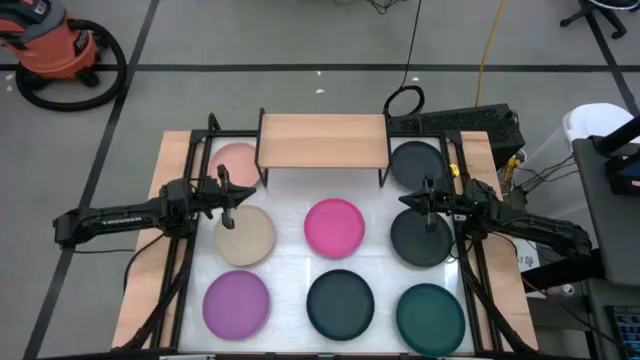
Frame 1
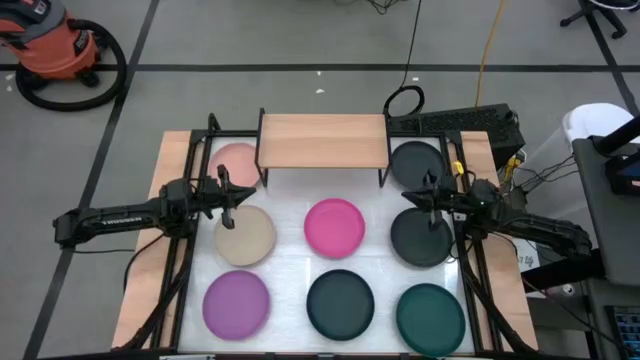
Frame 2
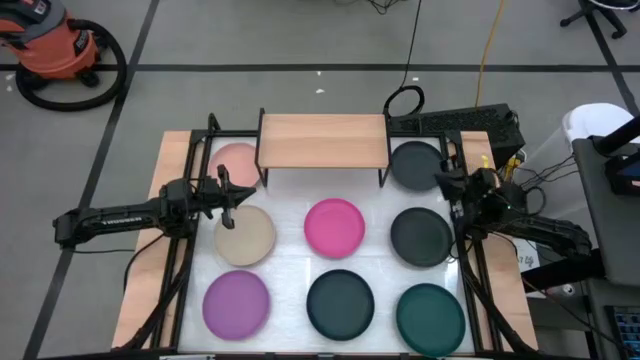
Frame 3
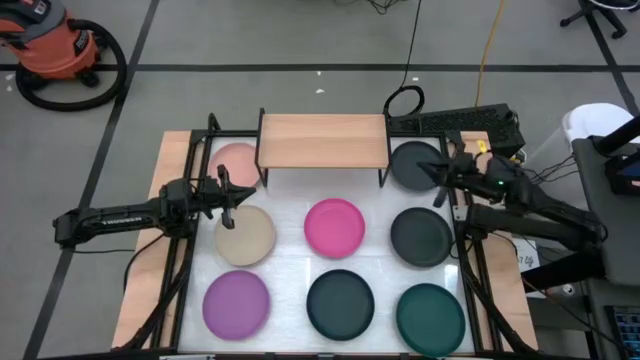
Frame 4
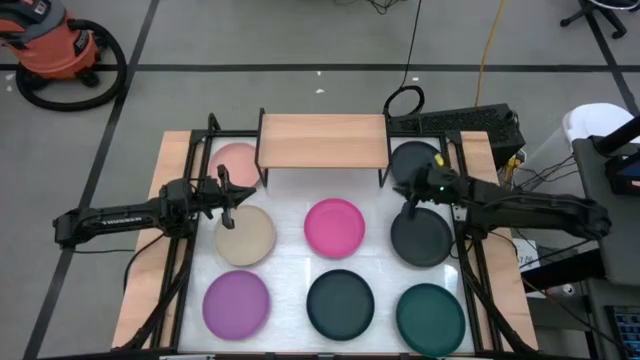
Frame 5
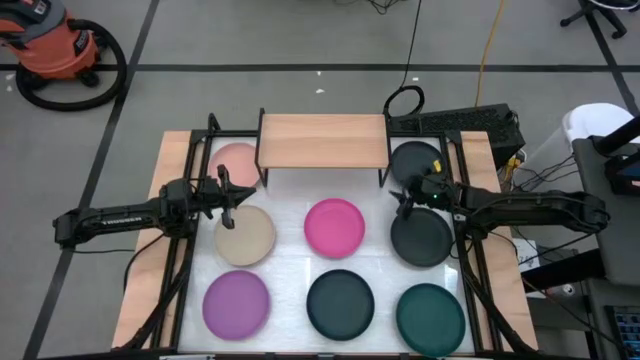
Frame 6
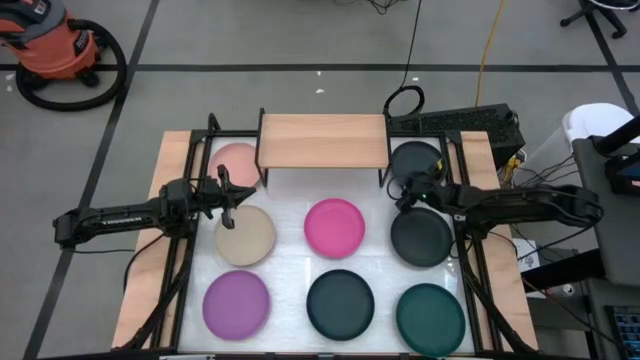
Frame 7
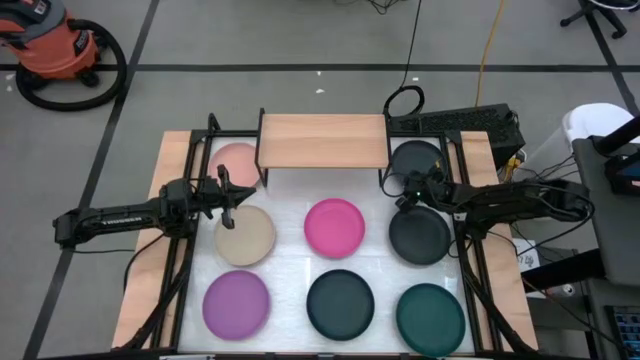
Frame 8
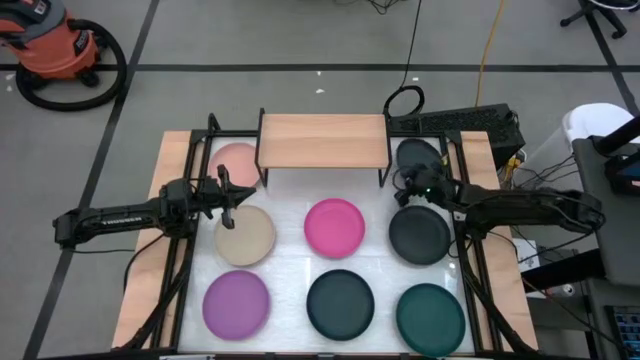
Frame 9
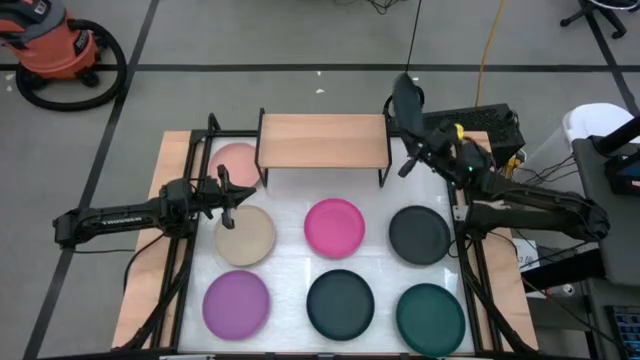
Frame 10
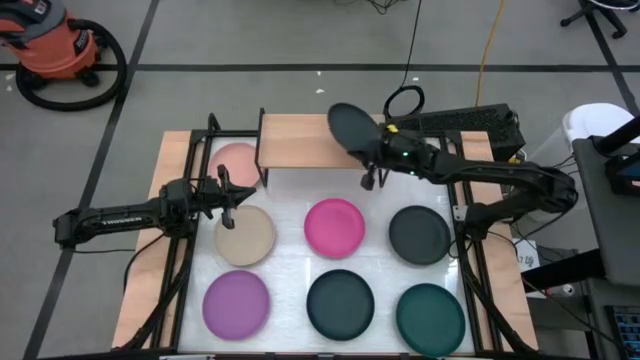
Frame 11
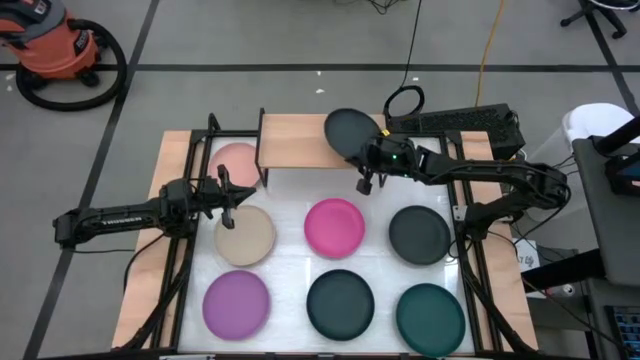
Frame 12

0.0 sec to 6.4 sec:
Task: Place and stack plates onto a shelf
Put the top black plate on the shelf

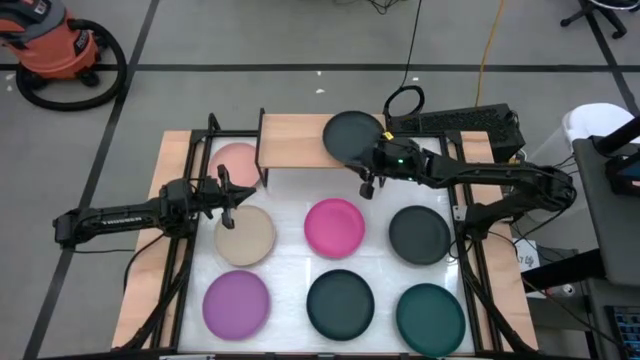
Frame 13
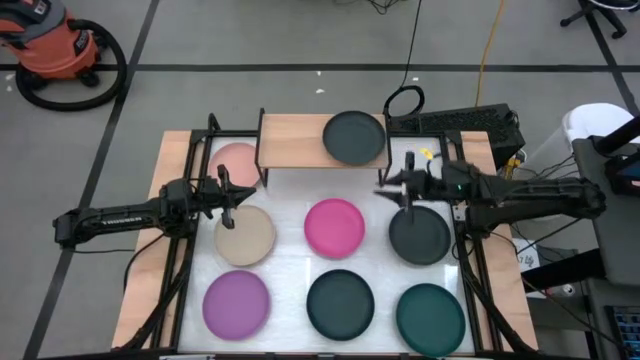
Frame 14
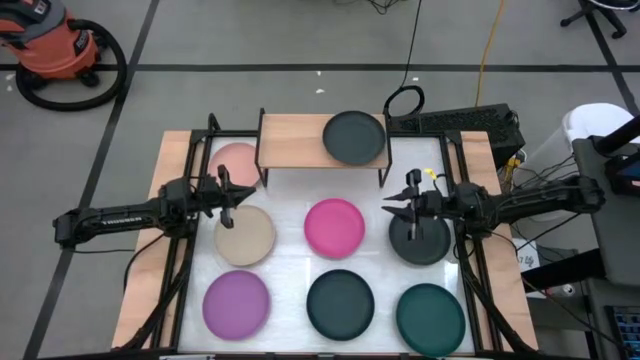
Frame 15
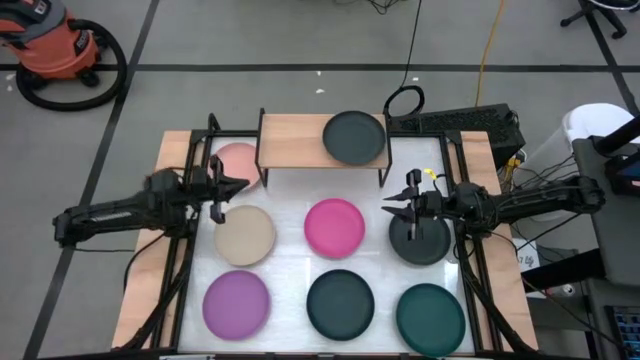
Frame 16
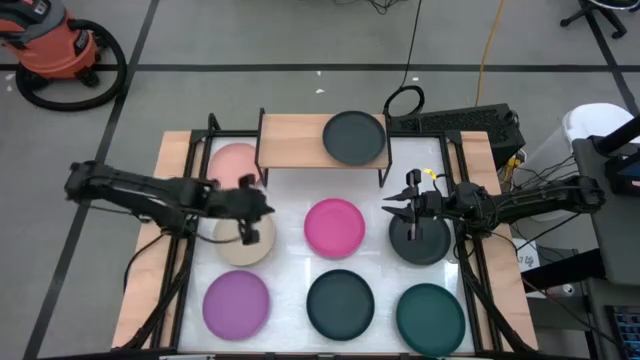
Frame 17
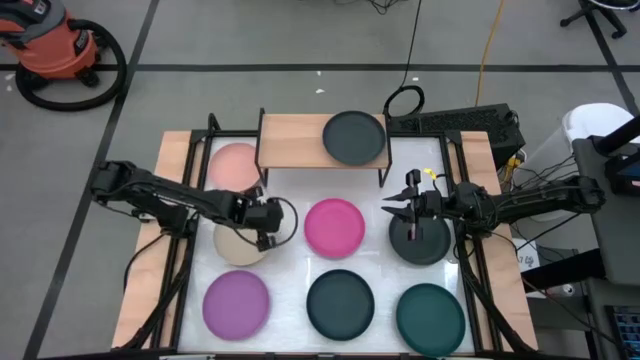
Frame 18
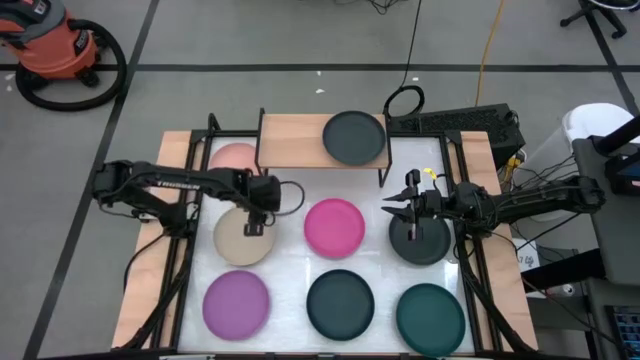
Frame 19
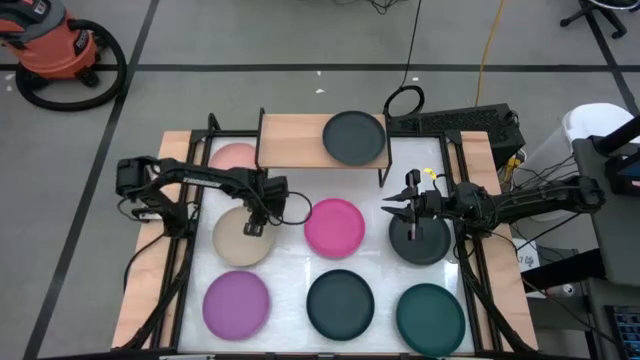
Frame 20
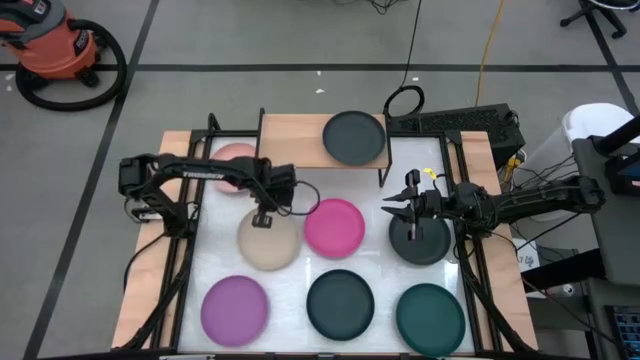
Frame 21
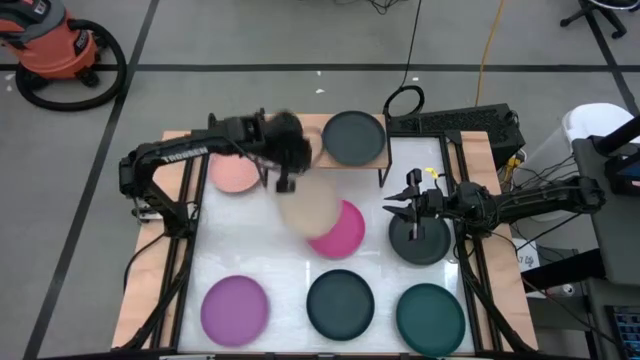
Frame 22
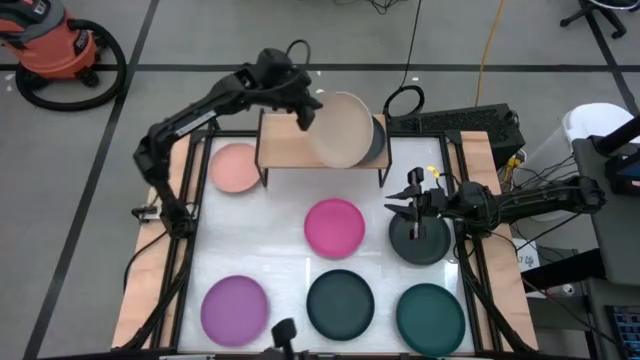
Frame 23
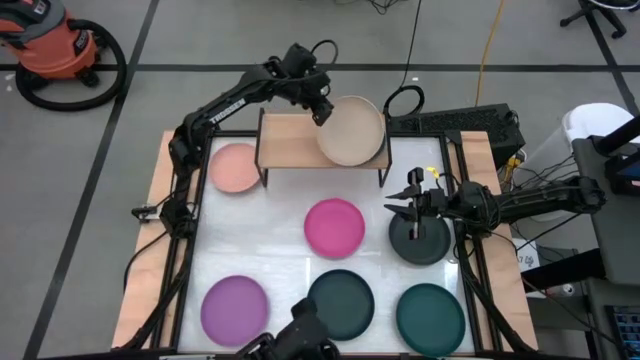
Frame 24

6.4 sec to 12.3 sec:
Stack the brown plate on top of the black plate on the shelf

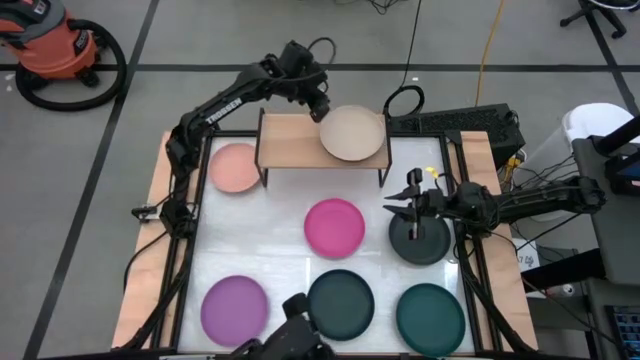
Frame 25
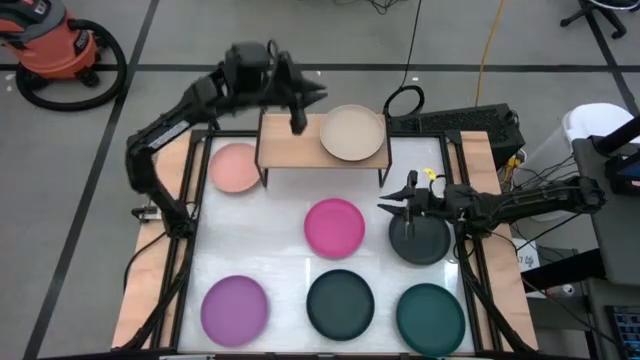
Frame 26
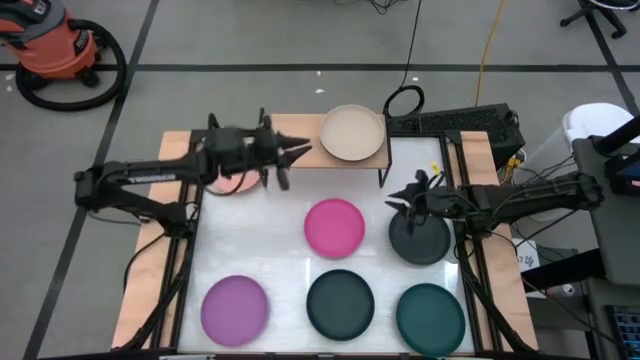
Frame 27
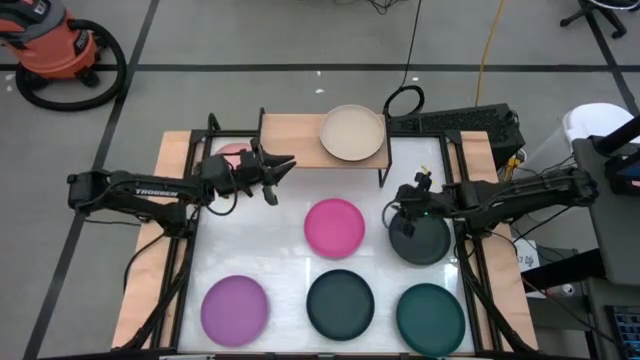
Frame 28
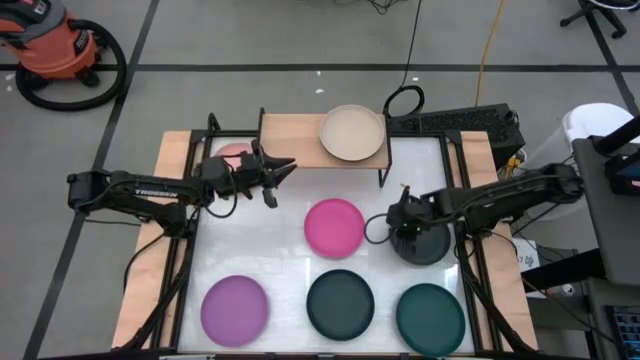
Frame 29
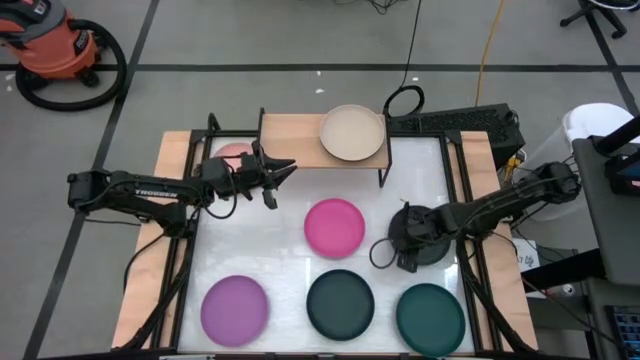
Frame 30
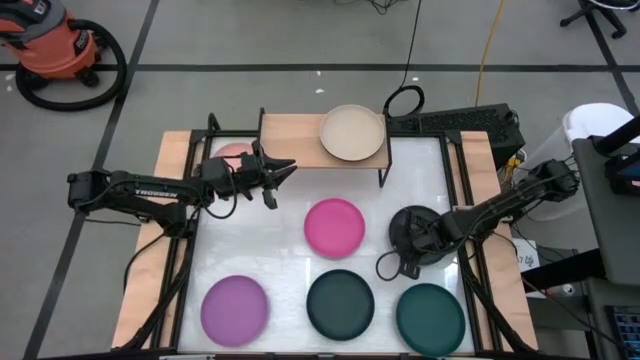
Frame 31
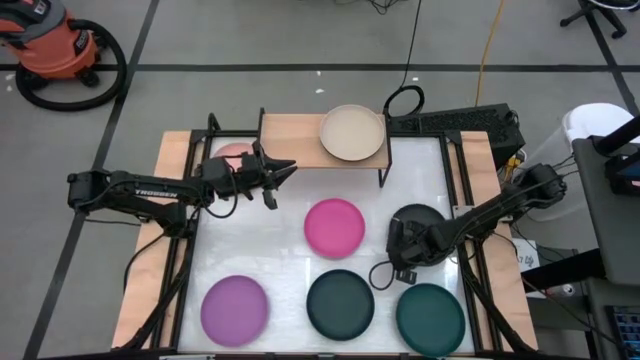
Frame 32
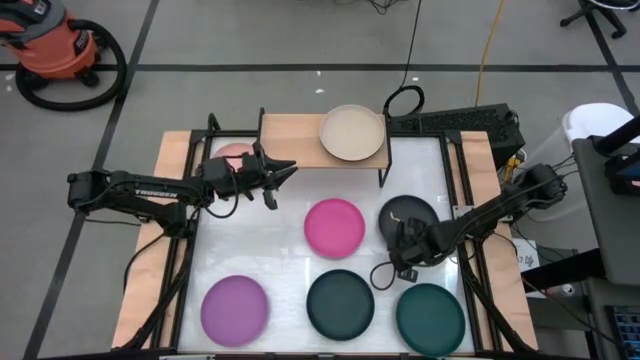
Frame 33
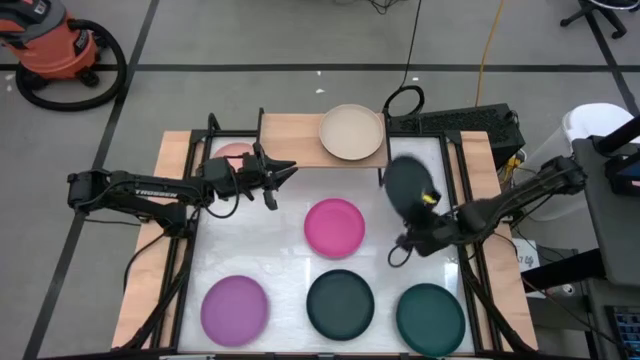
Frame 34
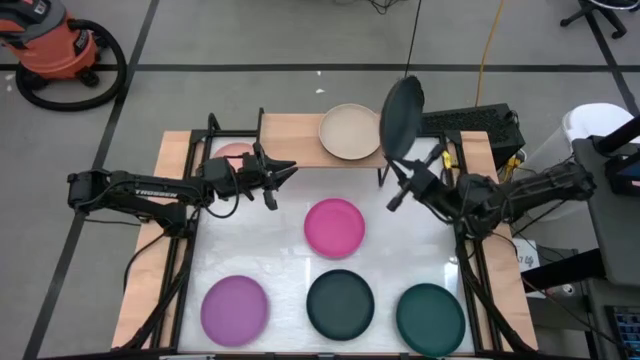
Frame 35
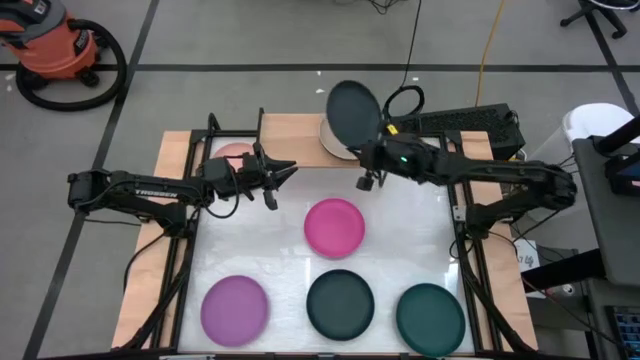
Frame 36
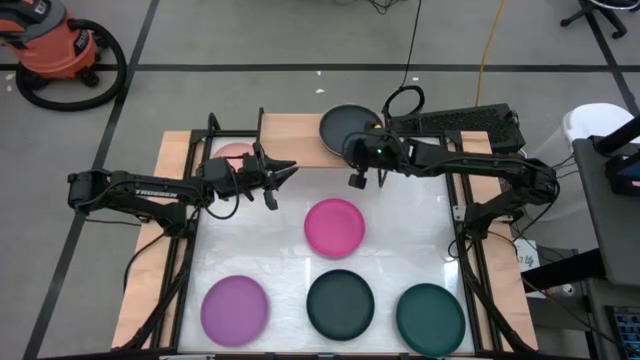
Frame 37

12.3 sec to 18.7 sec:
Stack the top black plate on top of the brown plate on the shelf

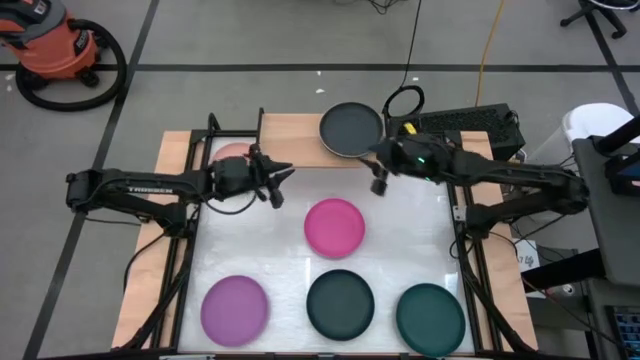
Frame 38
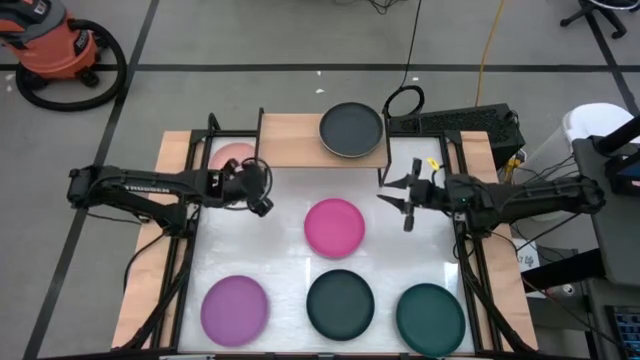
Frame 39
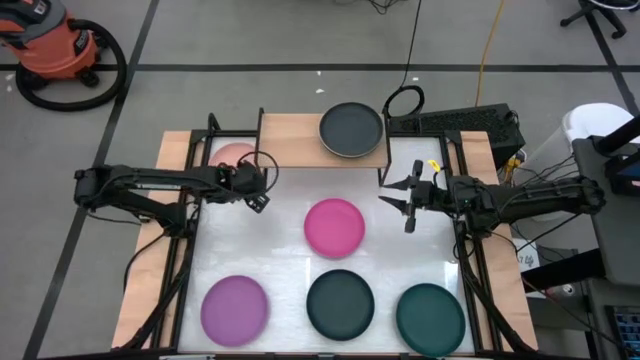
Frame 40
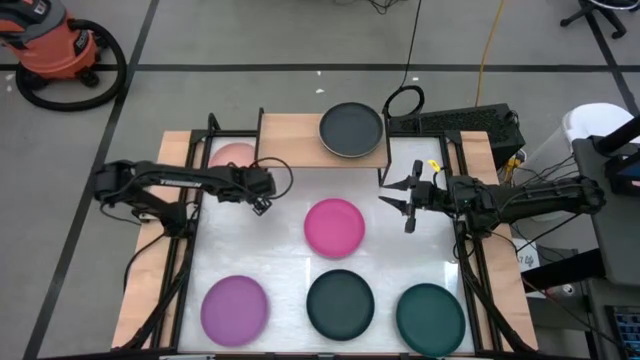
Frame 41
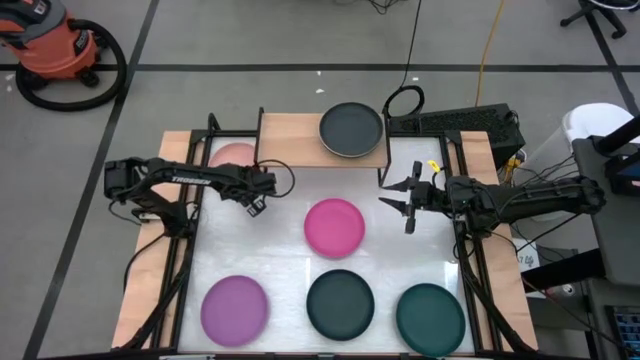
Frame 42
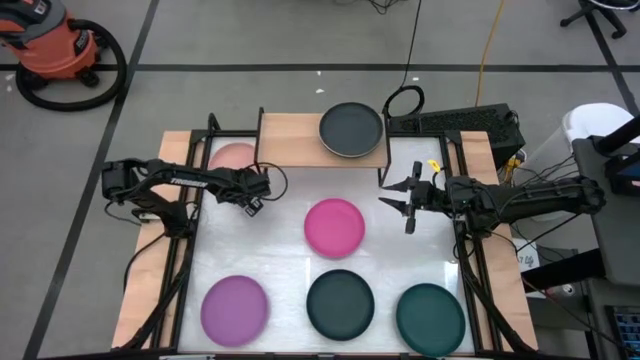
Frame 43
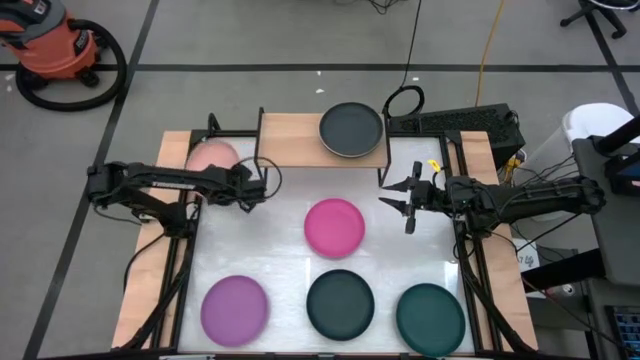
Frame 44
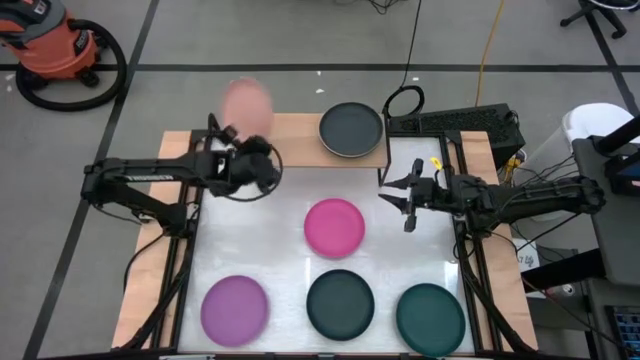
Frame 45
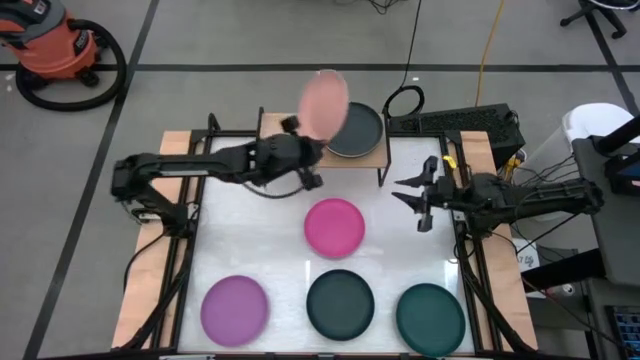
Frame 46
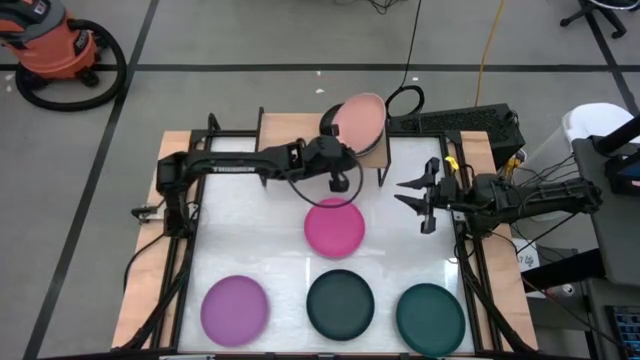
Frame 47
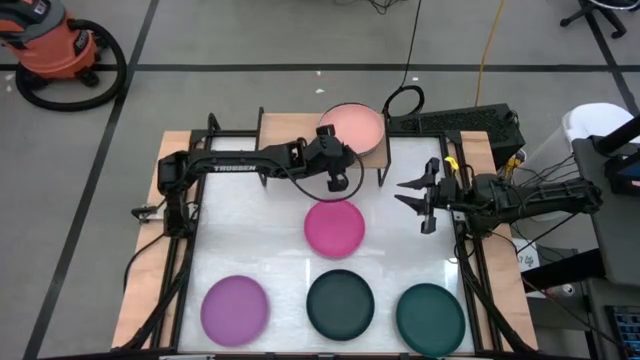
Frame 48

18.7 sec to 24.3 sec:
Stack the orange plate on top of the black plate on the shelf
